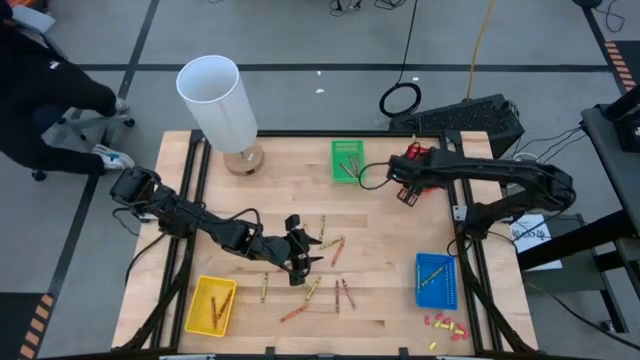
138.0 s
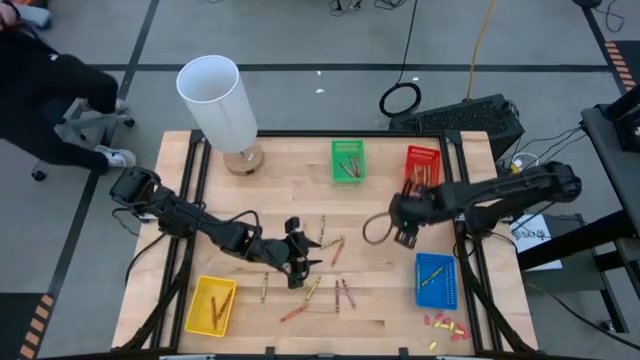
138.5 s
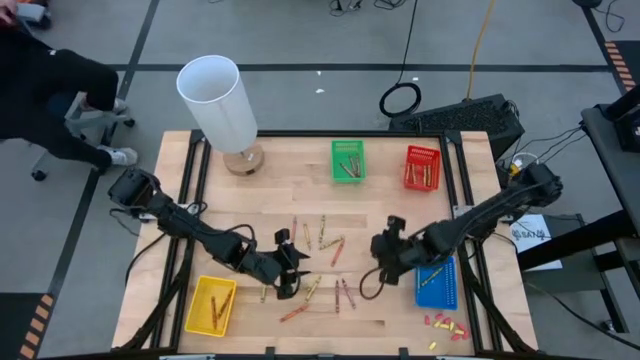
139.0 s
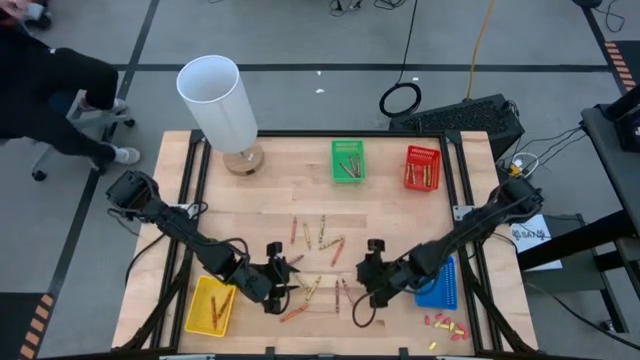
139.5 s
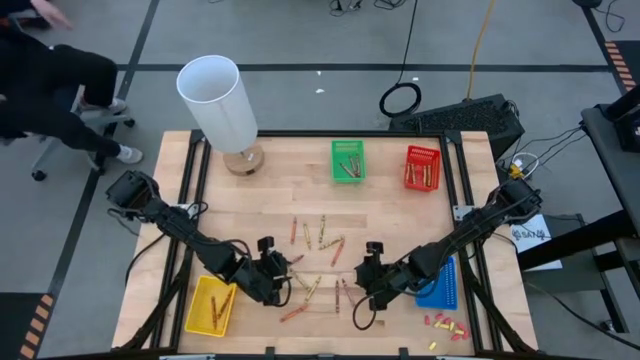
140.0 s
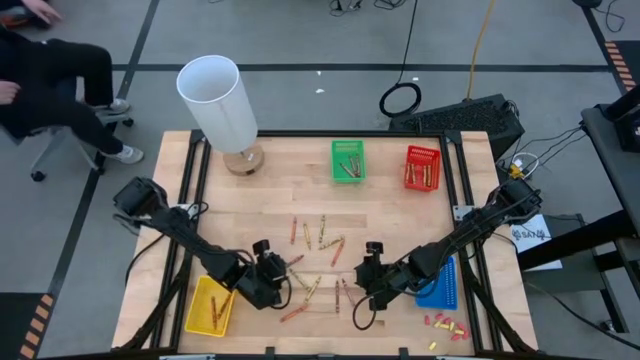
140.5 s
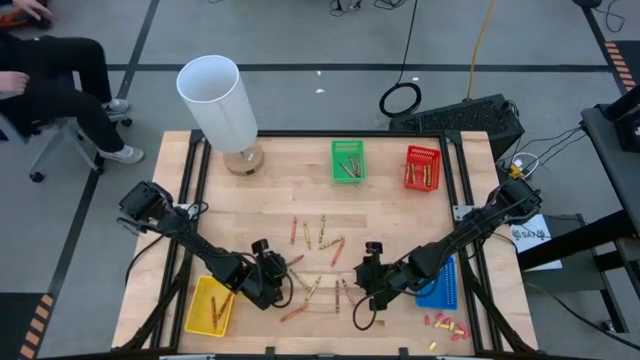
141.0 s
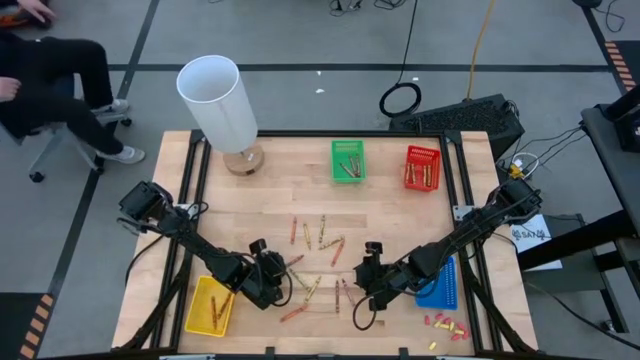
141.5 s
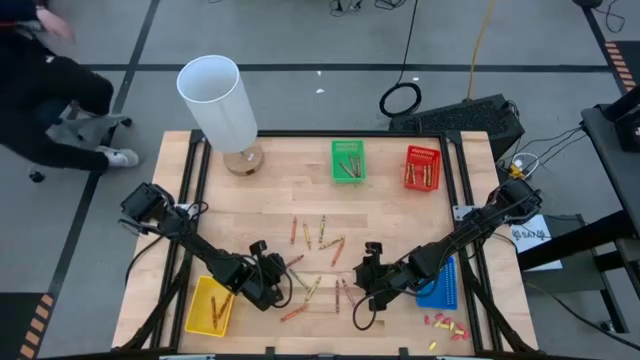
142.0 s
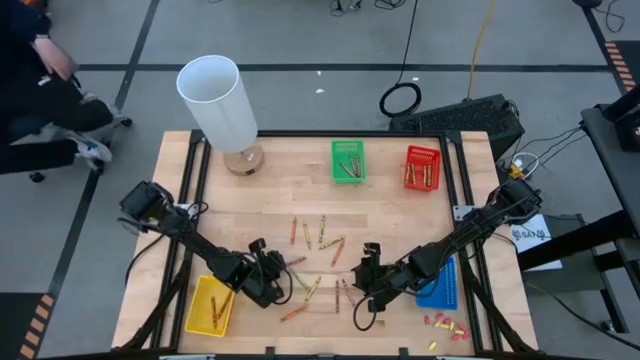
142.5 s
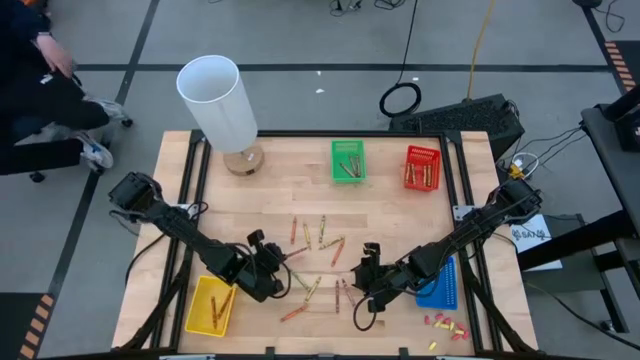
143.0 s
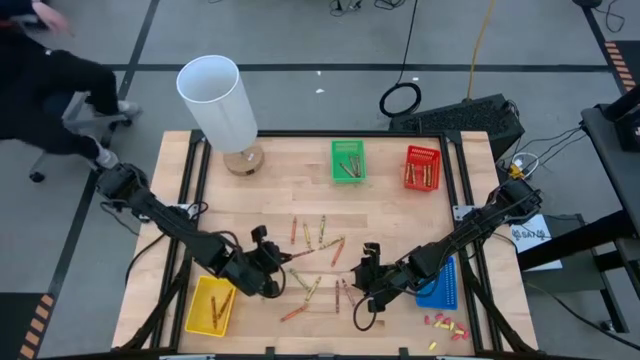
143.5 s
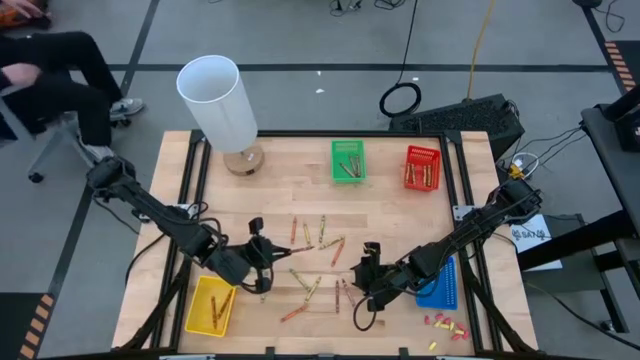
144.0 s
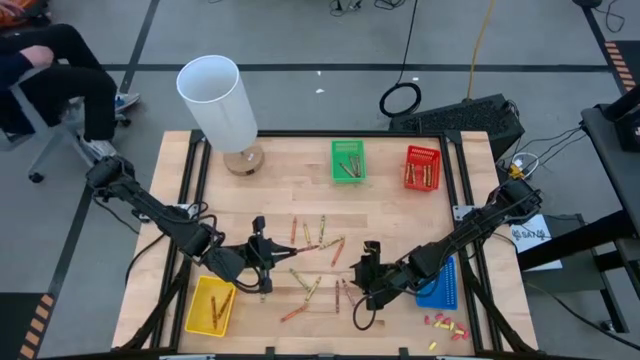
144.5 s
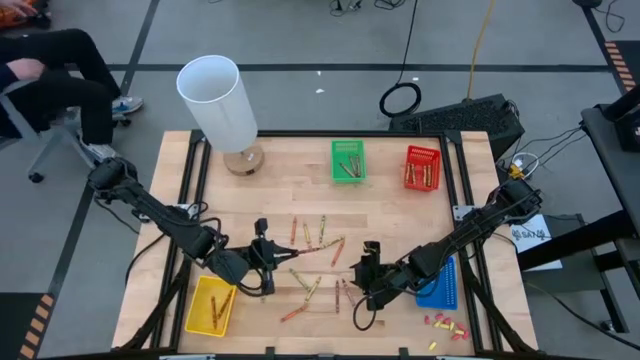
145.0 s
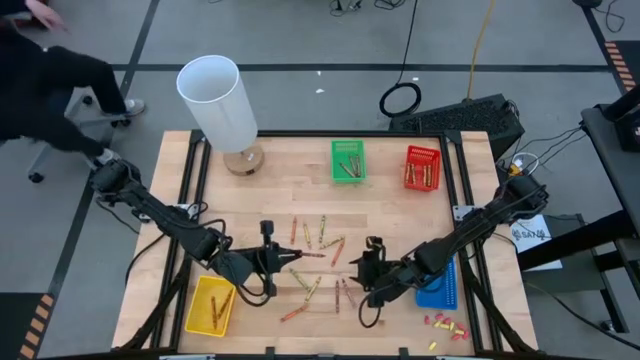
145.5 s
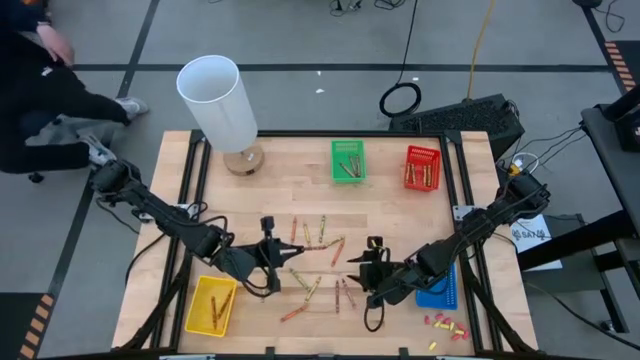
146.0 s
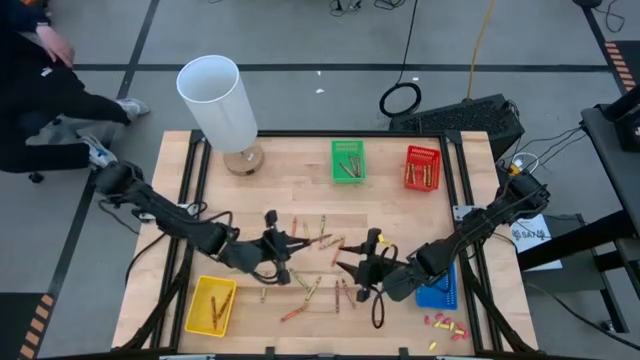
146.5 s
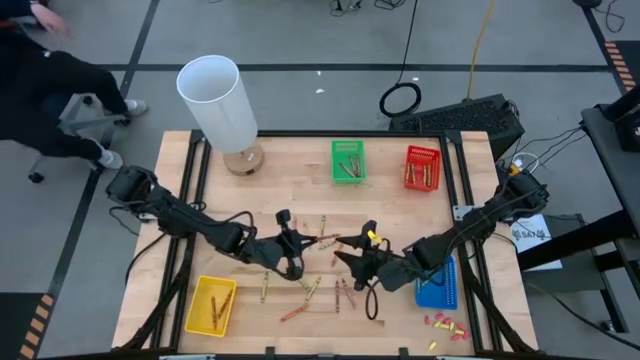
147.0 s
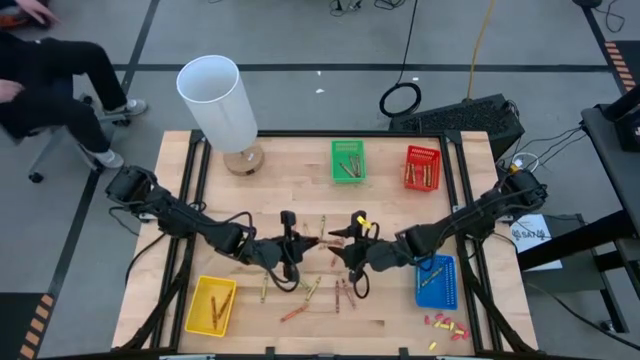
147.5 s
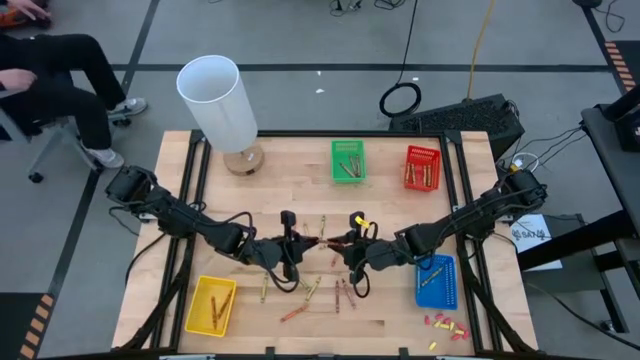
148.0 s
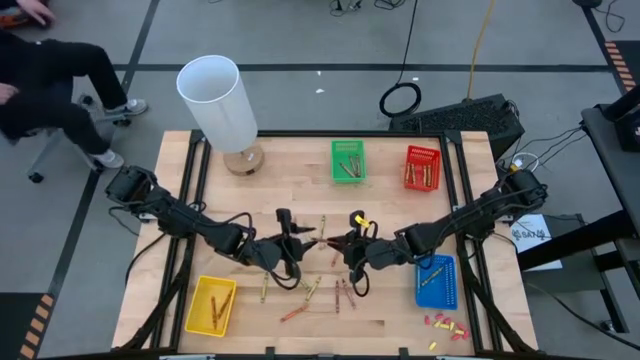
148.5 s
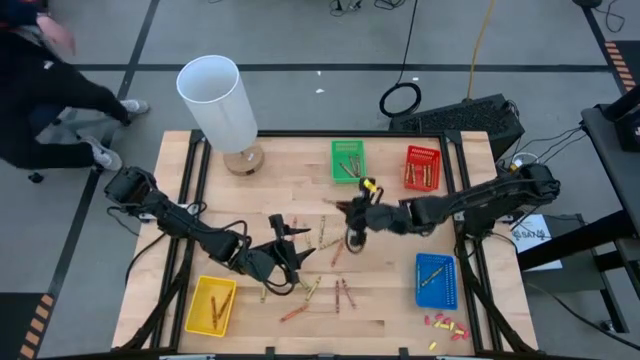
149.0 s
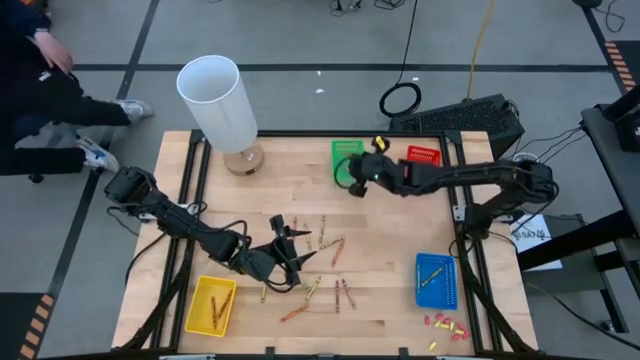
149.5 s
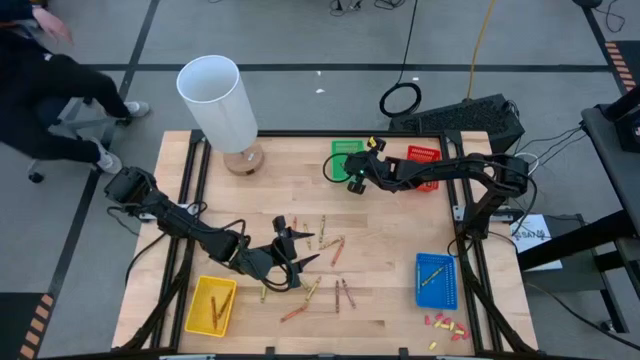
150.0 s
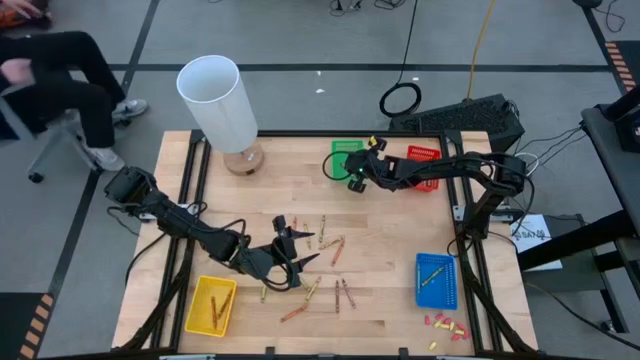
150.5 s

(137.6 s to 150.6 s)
Task: Sort crayons
Put the red crayon into the green bin

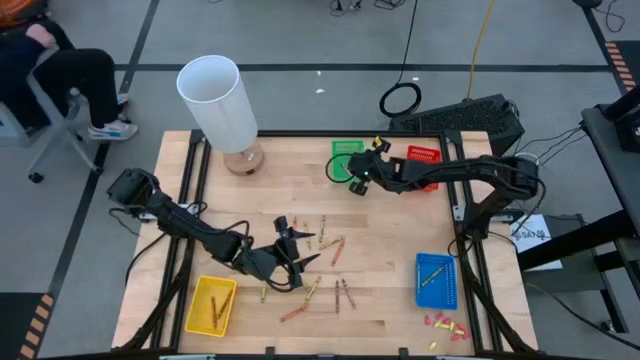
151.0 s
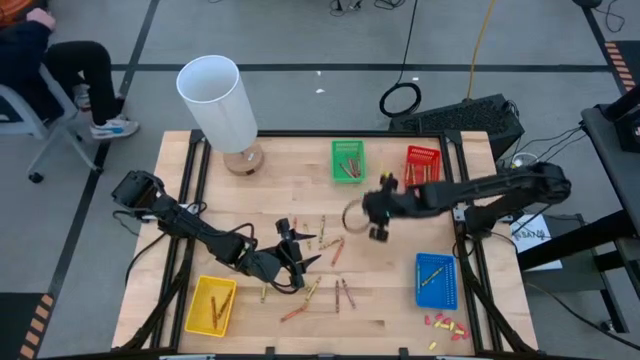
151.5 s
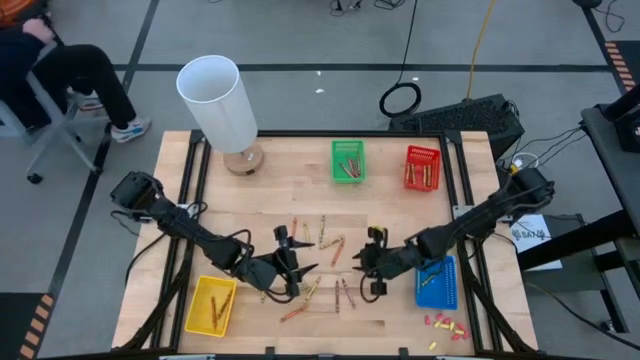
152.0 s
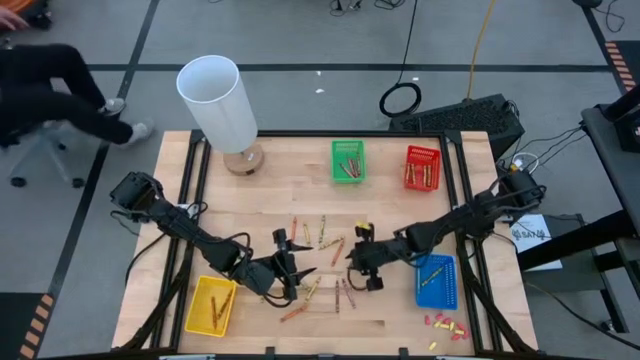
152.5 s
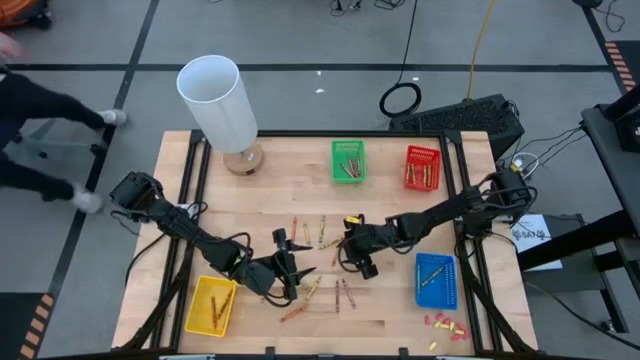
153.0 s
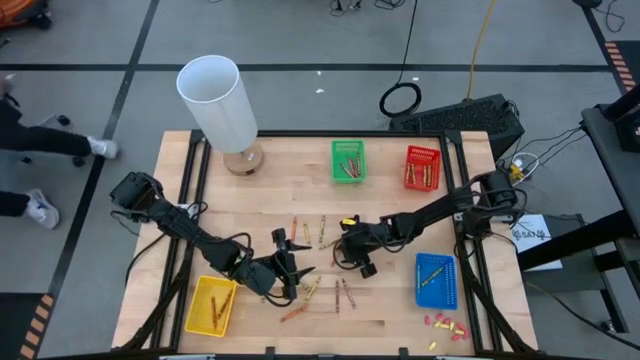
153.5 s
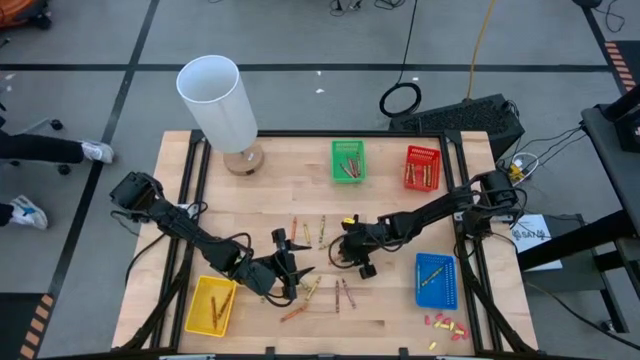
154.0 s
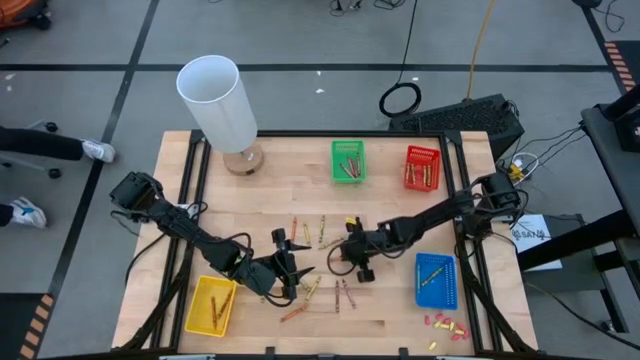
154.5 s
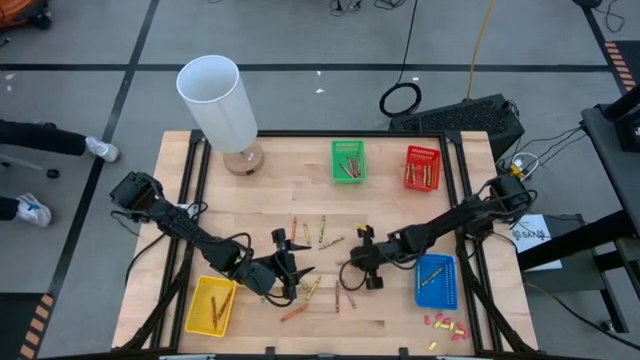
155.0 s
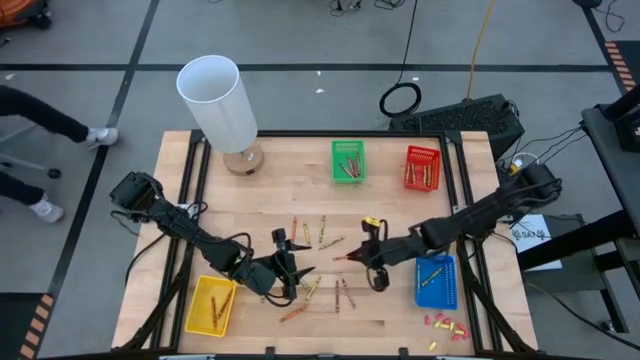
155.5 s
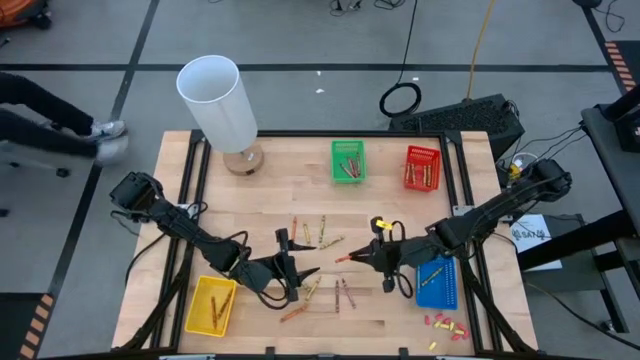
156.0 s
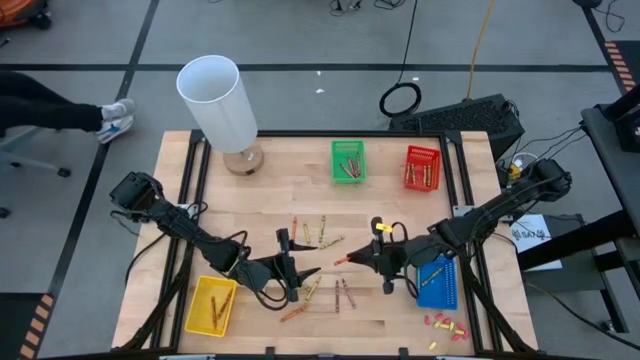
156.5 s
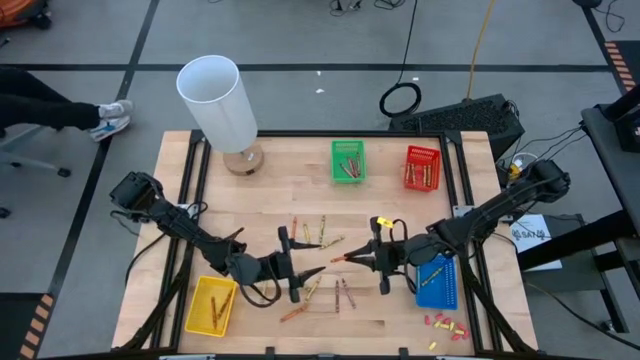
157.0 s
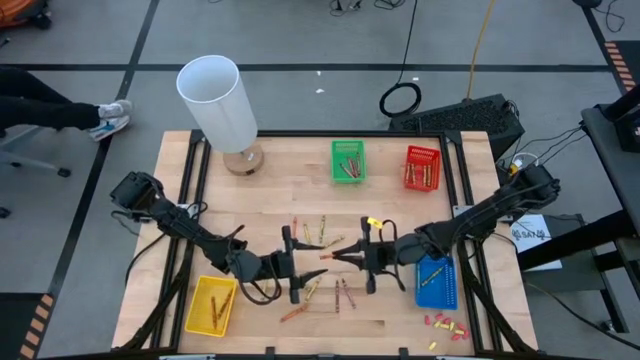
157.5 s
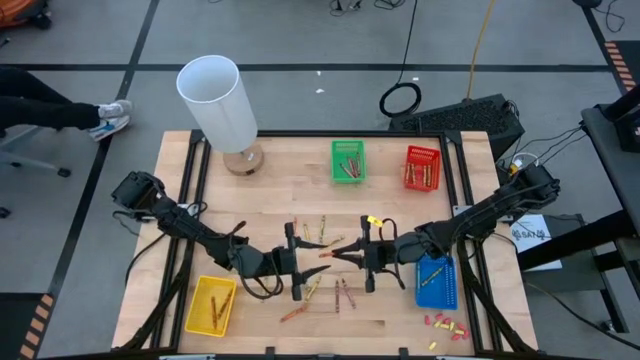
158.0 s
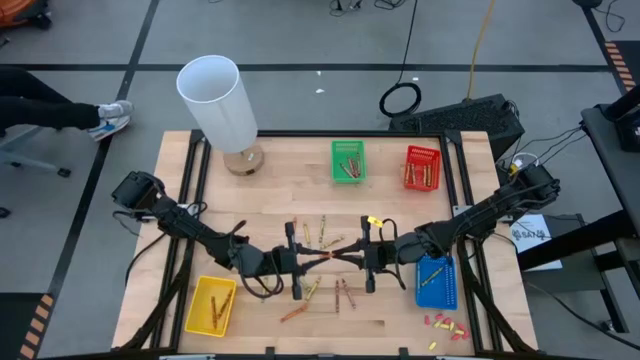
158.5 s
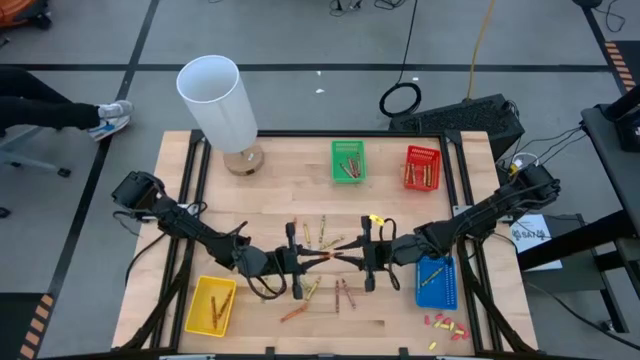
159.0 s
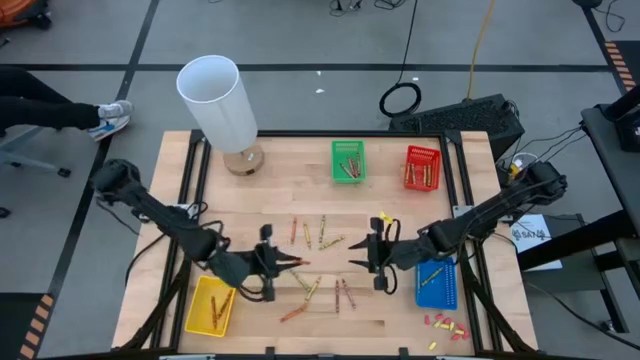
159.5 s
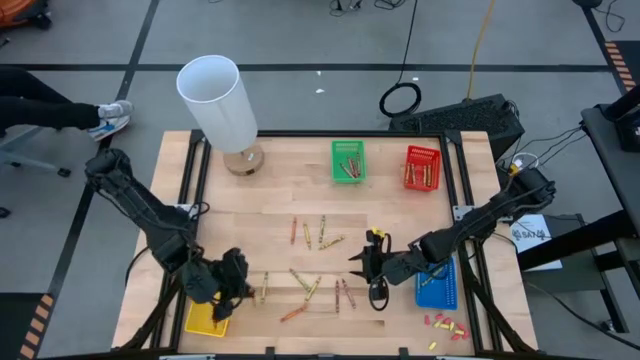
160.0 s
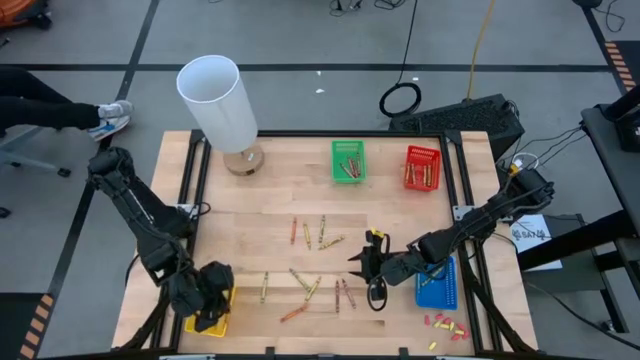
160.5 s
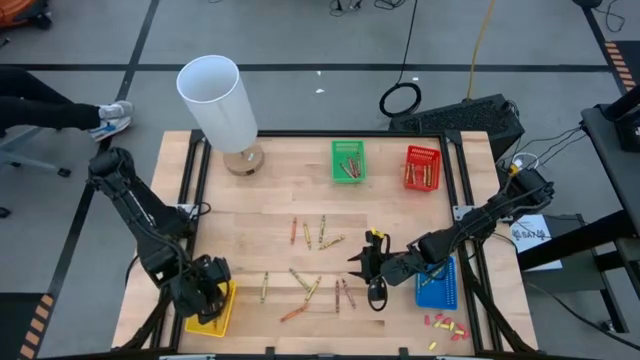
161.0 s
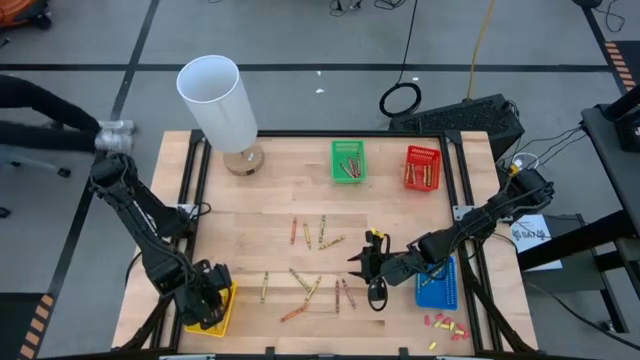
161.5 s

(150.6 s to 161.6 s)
Put the orange crayon into the yellow bin
